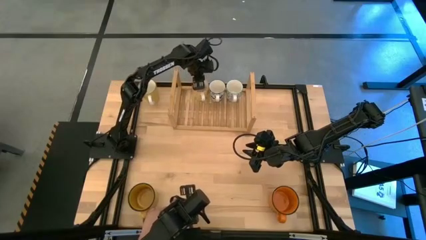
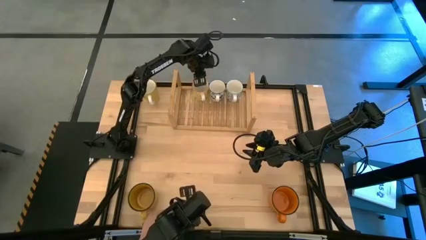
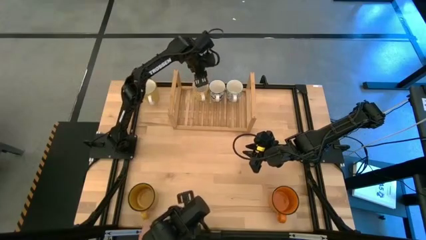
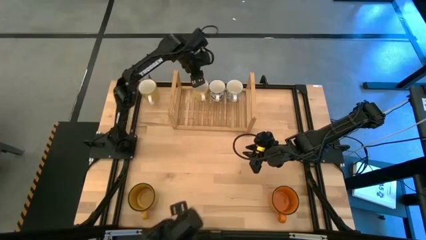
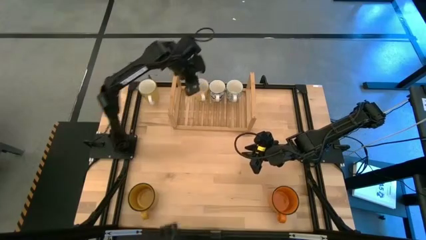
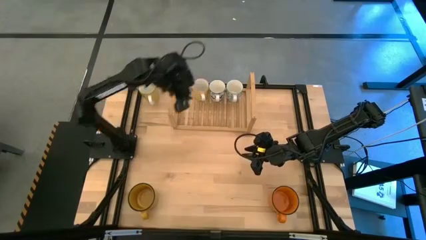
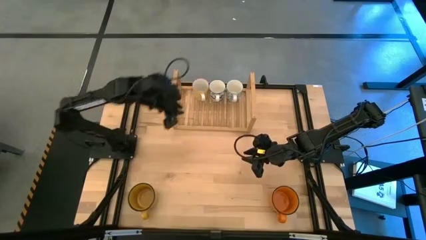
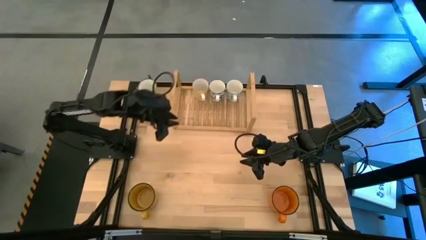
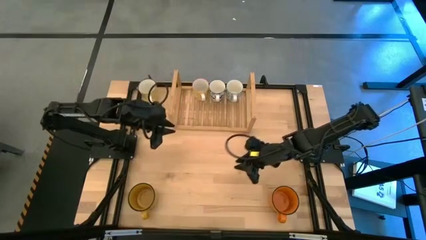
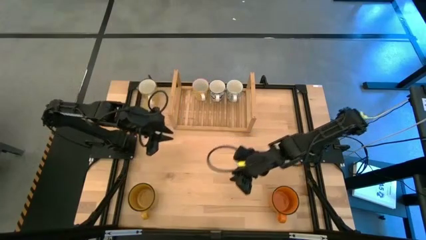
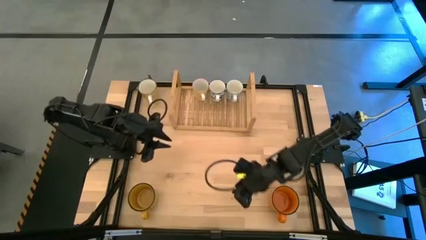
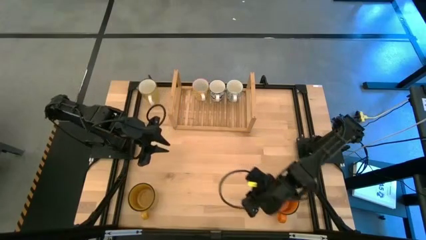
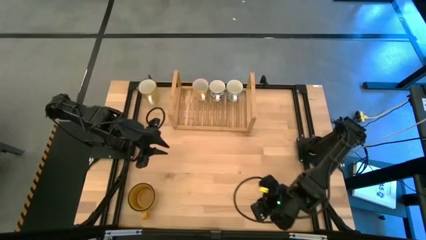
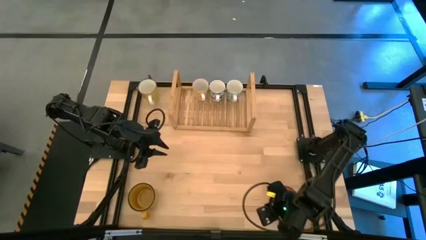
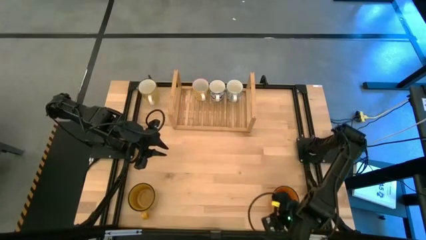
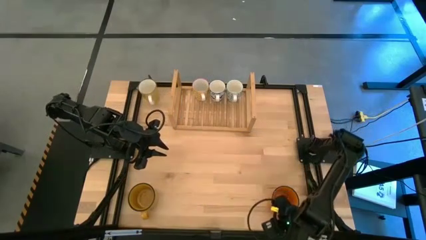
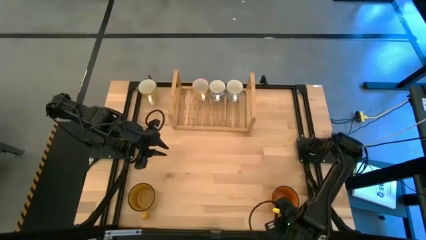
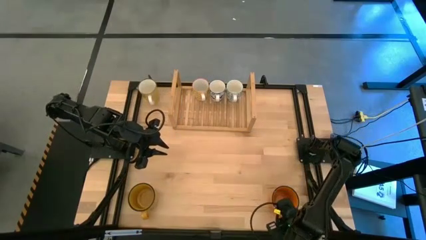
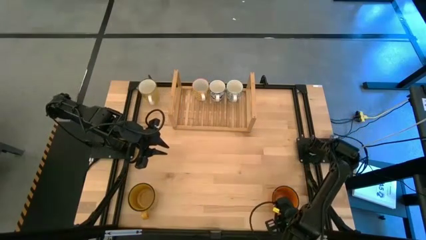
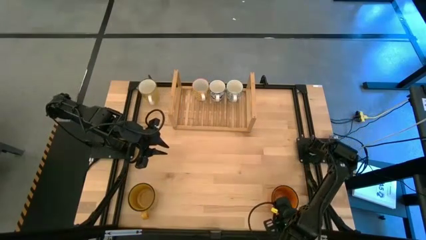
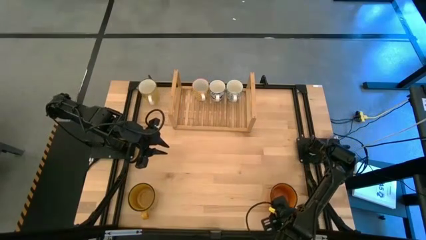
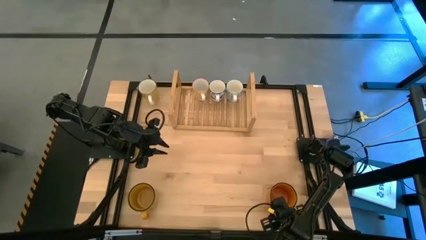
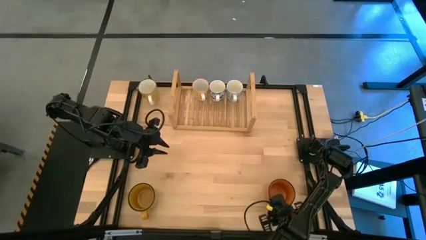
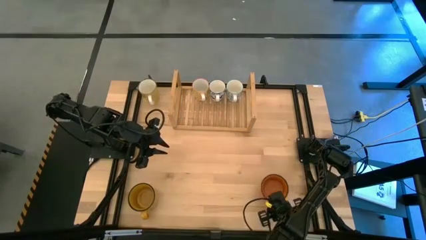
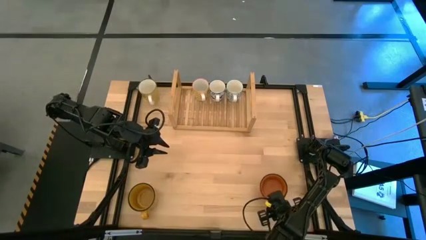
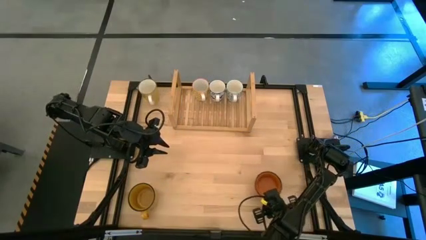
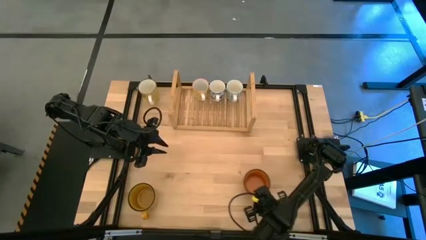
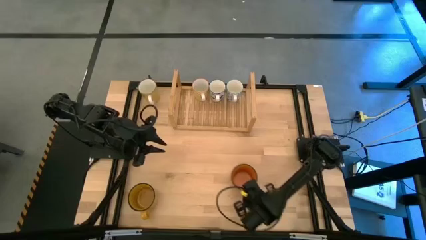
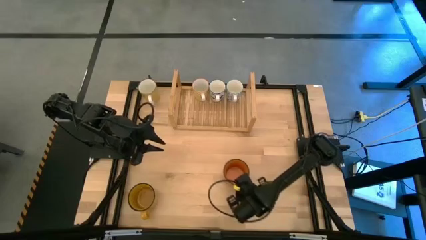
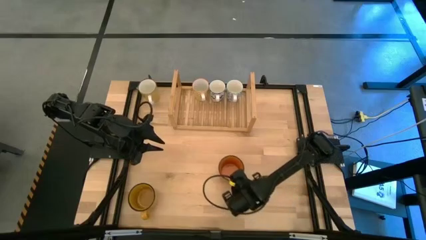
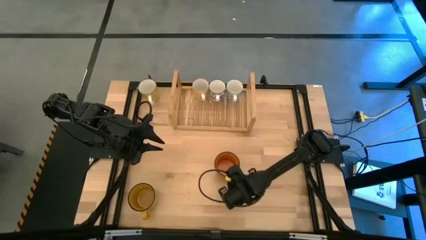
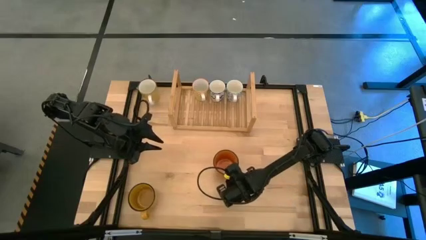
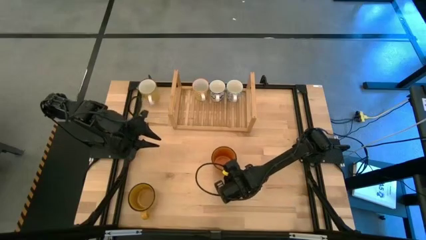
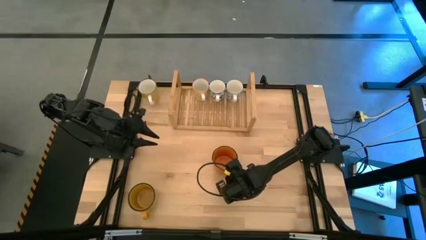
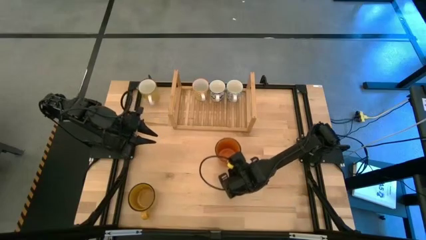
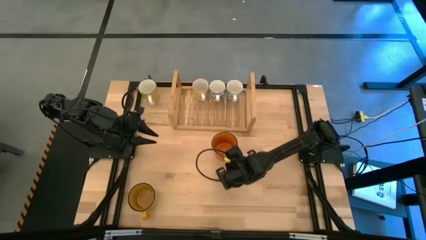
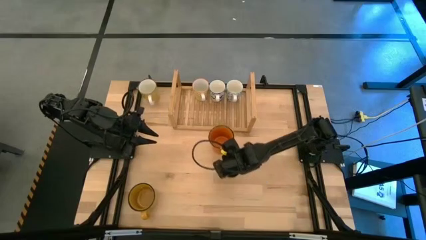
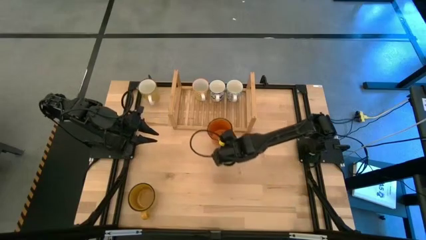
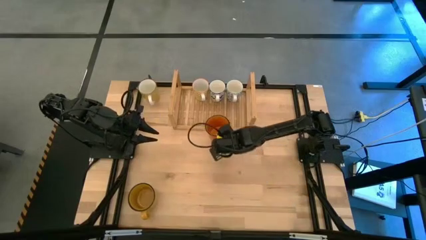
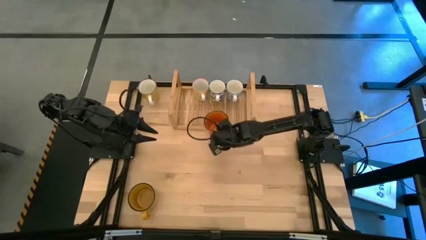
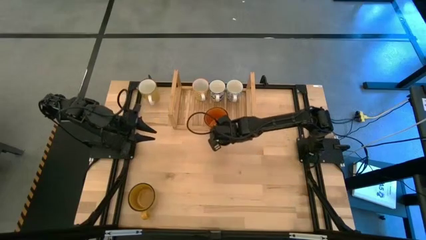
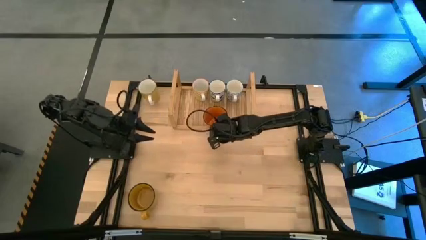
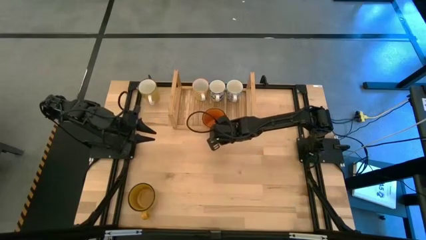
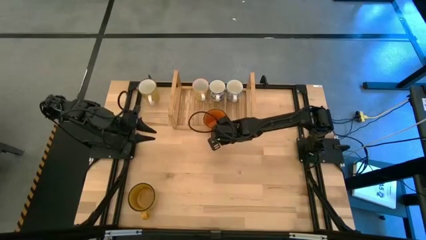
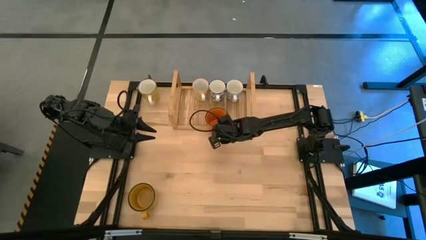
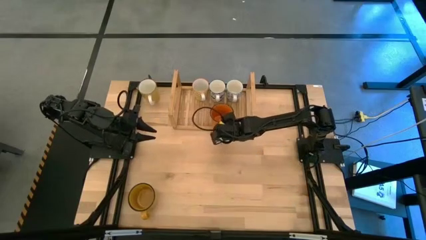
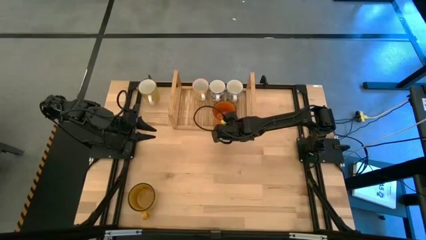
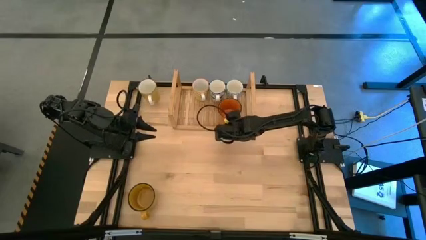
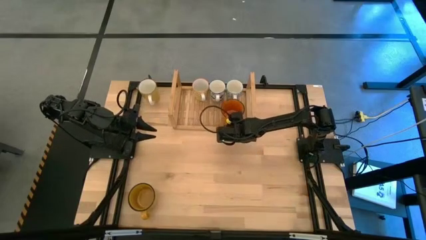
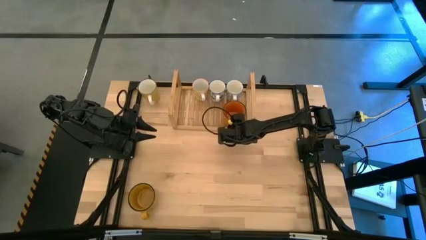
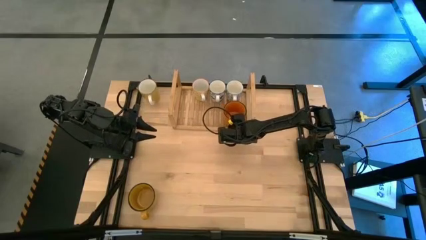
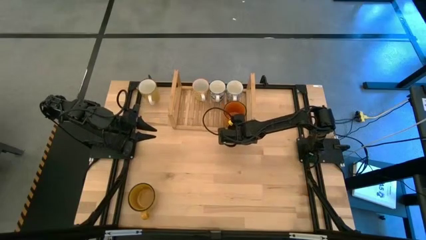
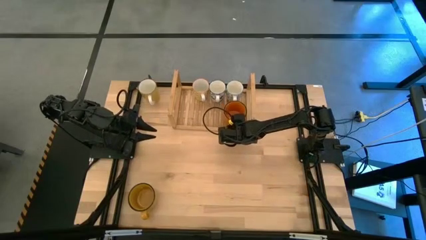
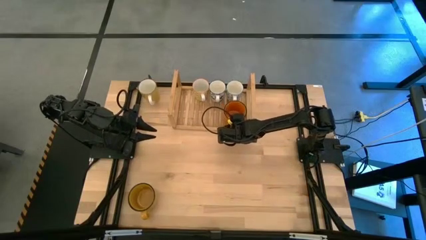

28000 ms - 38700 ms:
Task: Place coffee mugs
Put the orange mug on the shelf

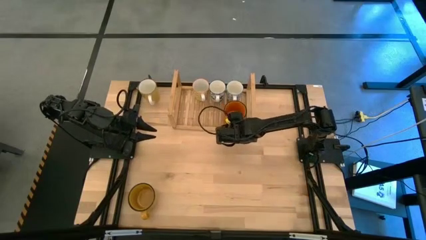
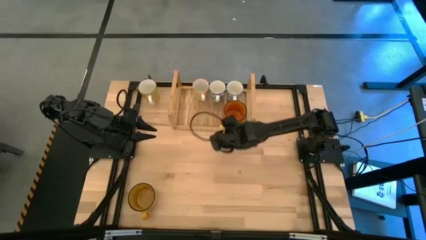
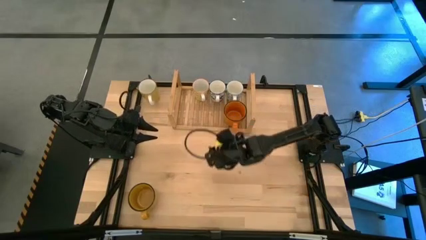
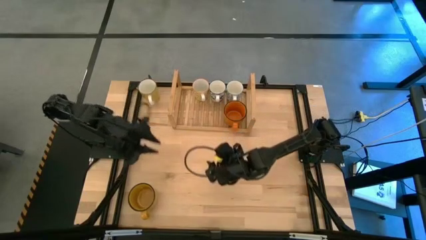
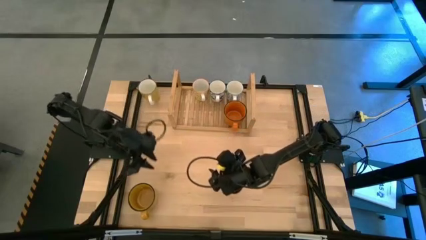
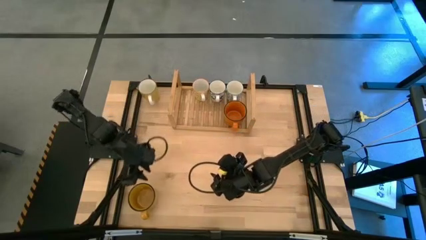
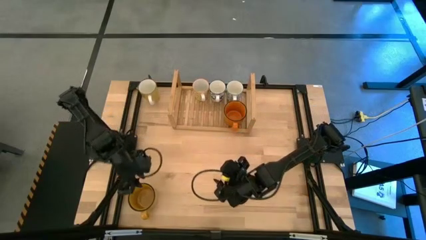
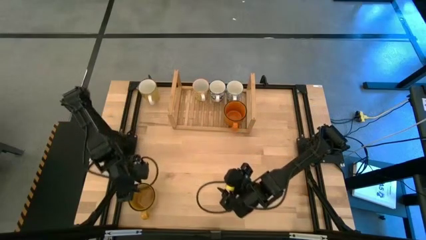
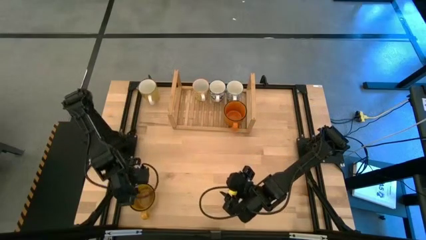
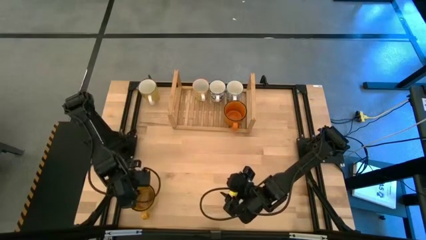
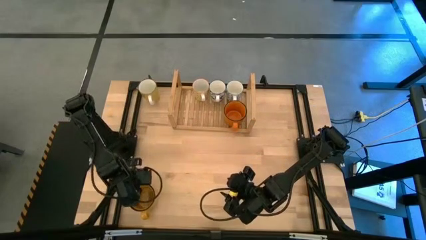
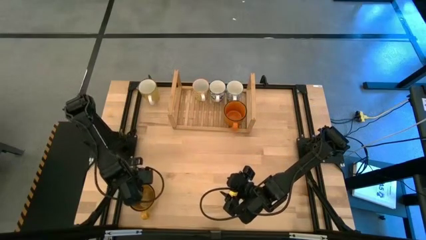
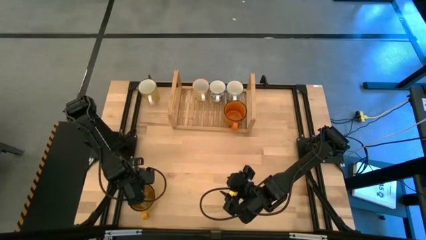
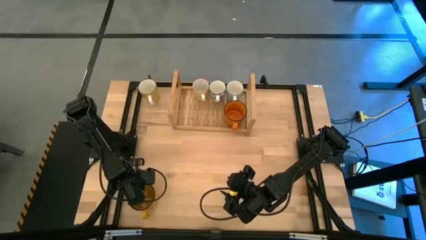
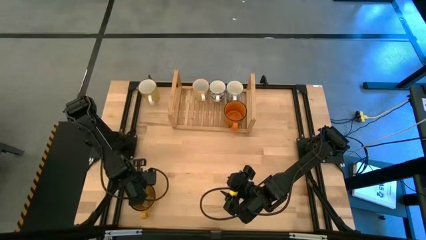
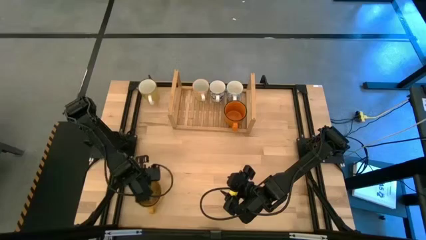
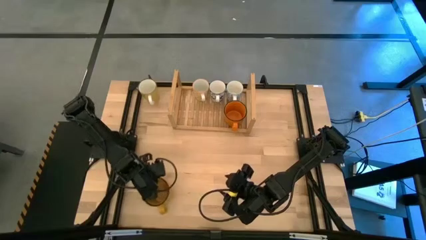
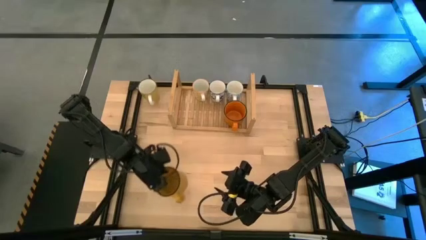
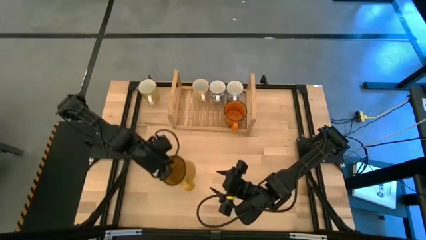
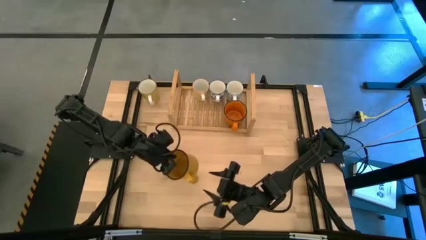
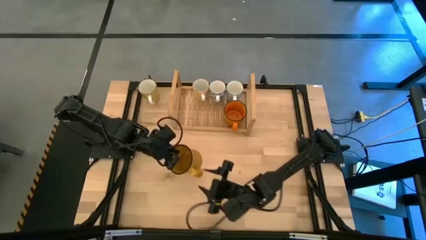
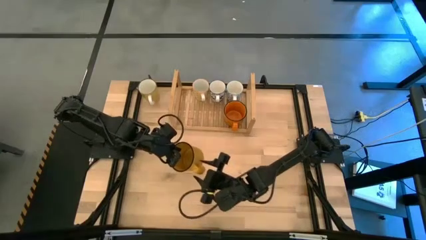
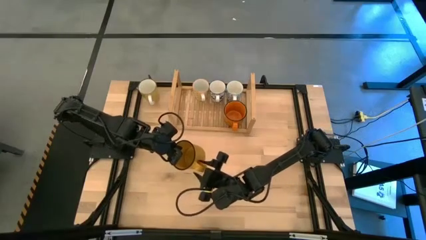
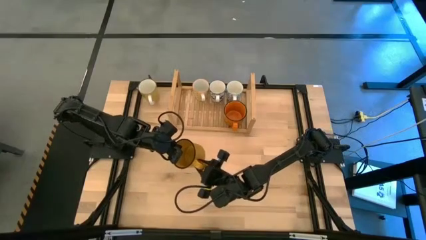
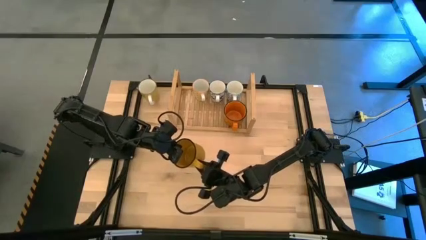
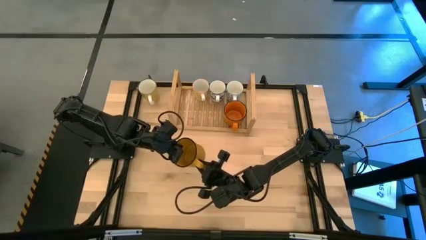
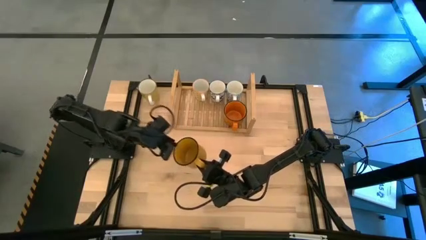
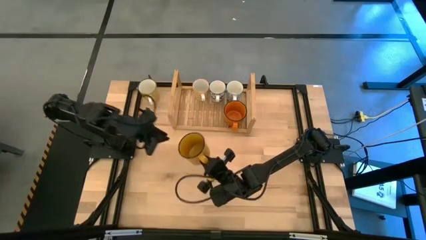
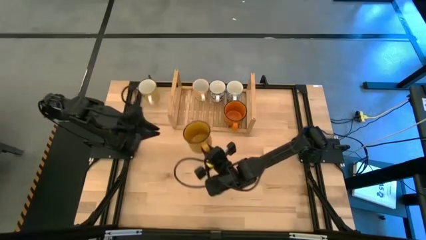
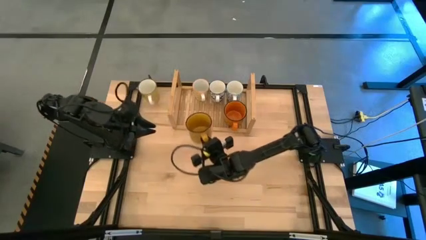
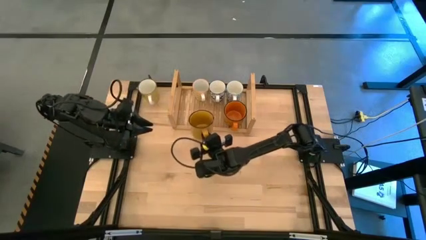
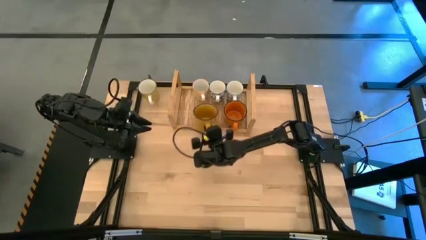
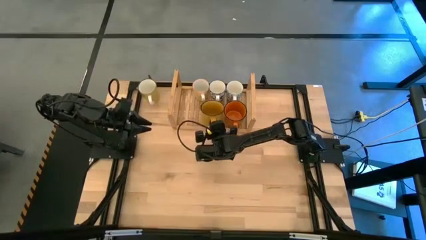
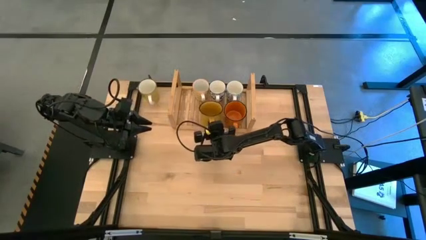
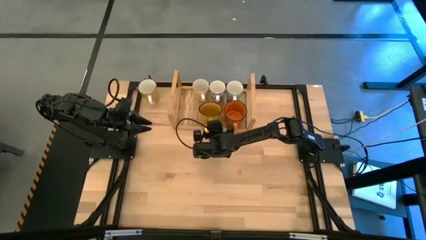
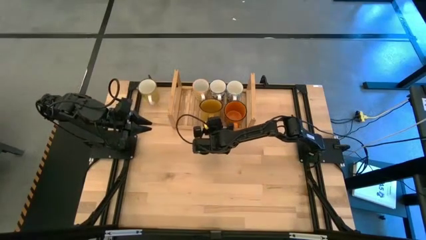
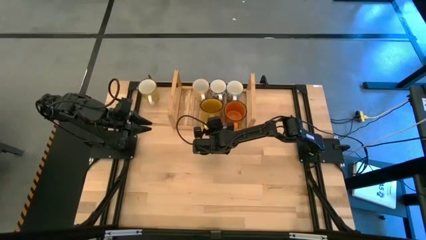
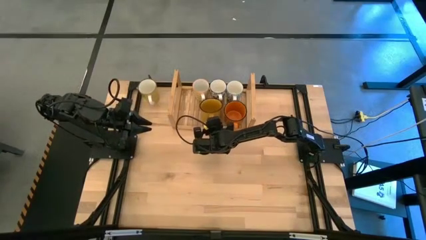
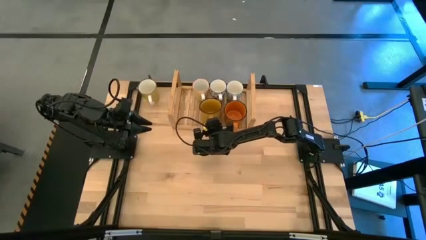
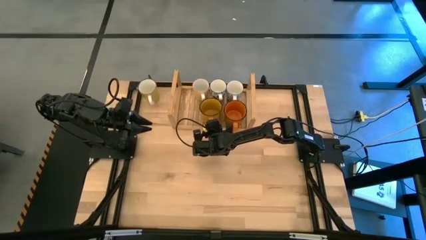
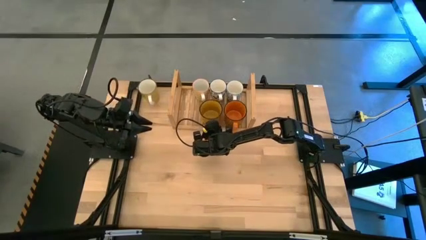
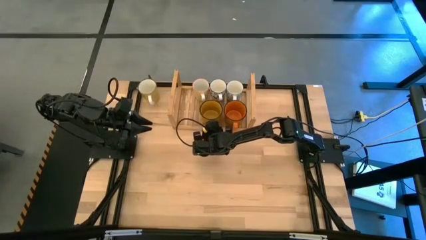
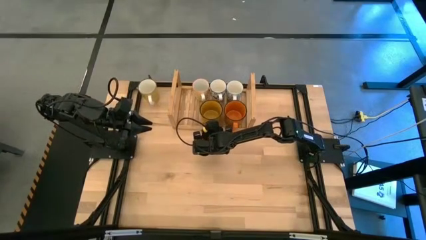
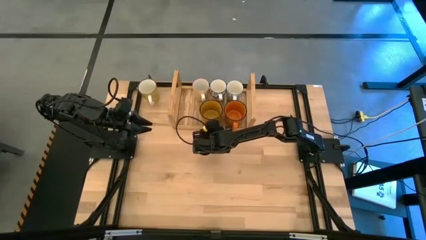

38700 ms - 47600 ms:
Put the yellow mug on the shelf
